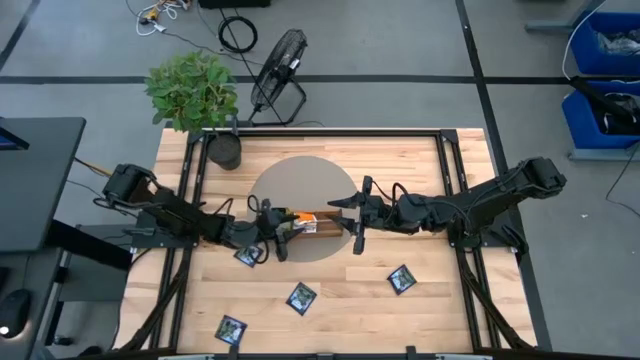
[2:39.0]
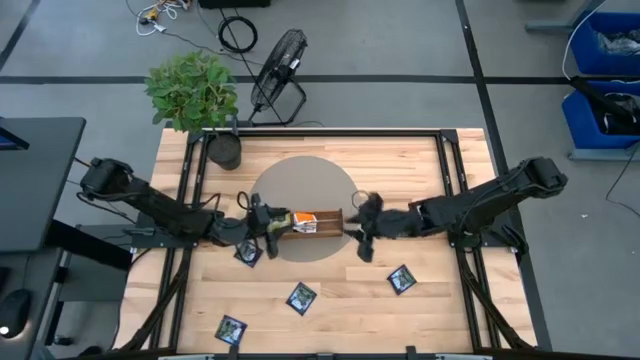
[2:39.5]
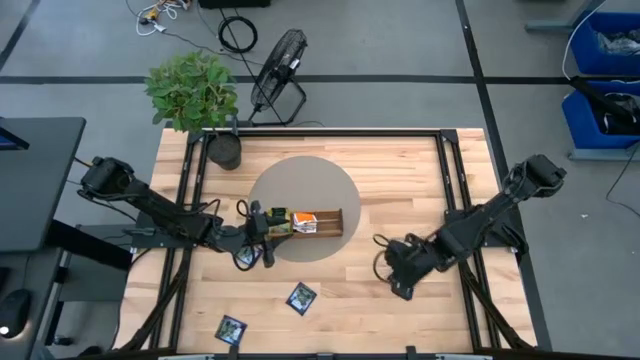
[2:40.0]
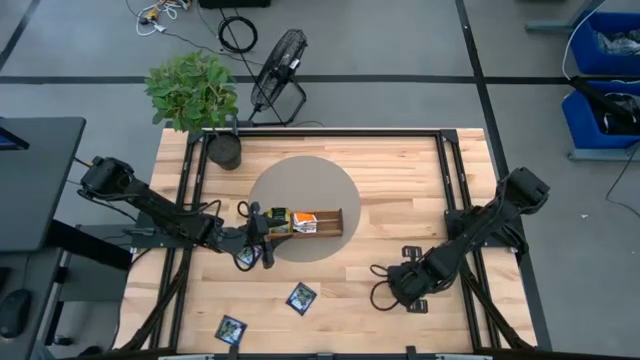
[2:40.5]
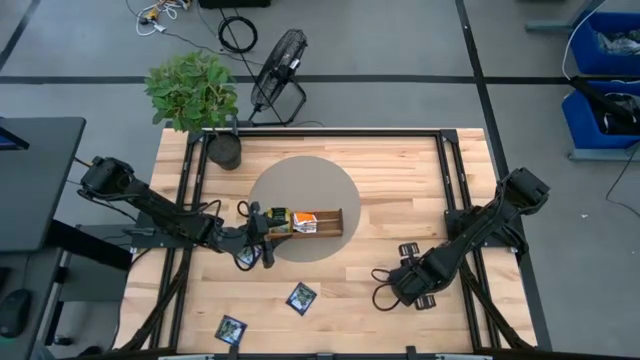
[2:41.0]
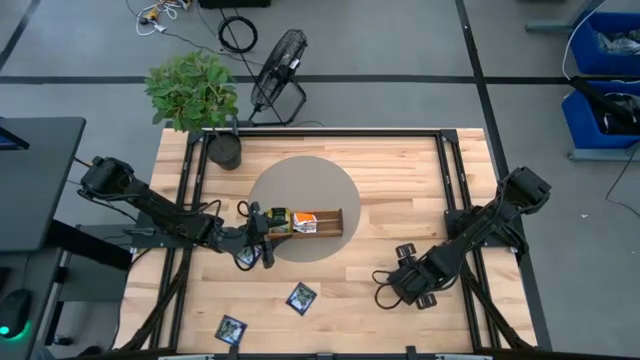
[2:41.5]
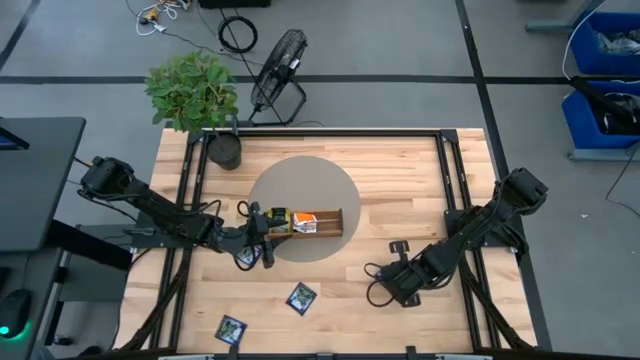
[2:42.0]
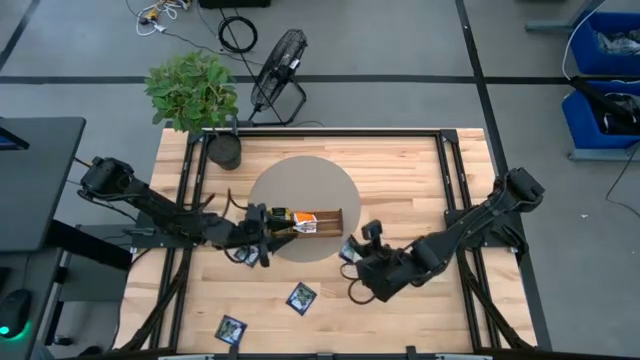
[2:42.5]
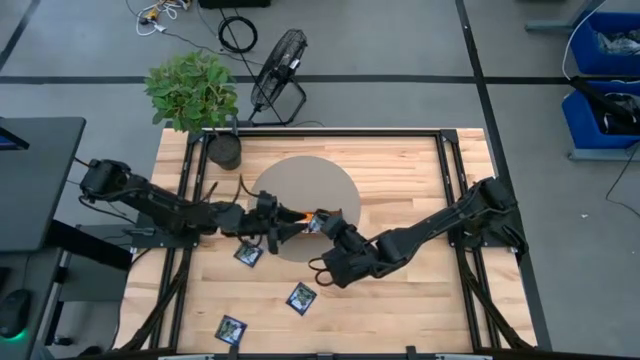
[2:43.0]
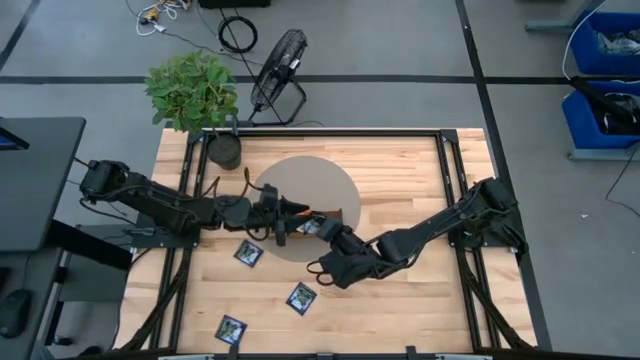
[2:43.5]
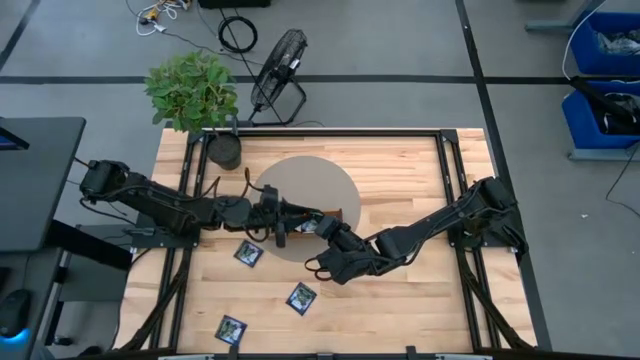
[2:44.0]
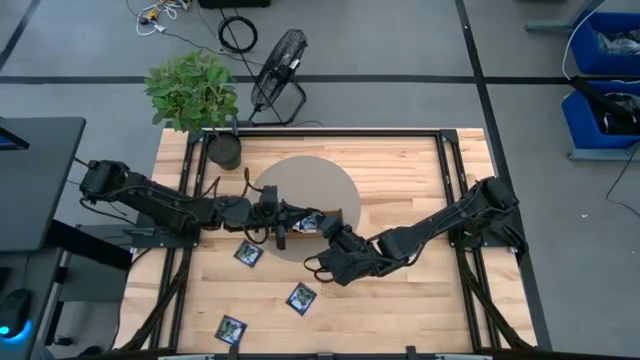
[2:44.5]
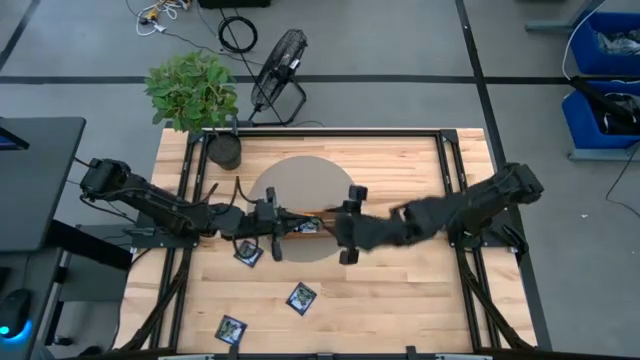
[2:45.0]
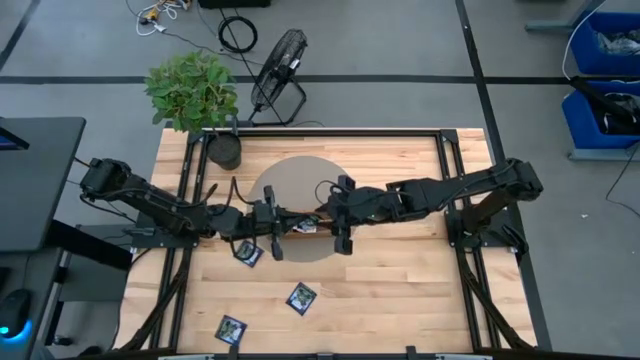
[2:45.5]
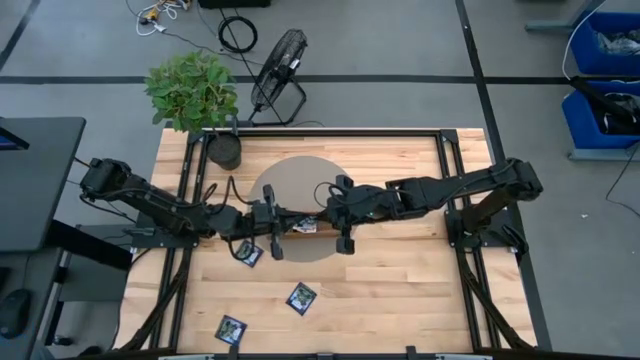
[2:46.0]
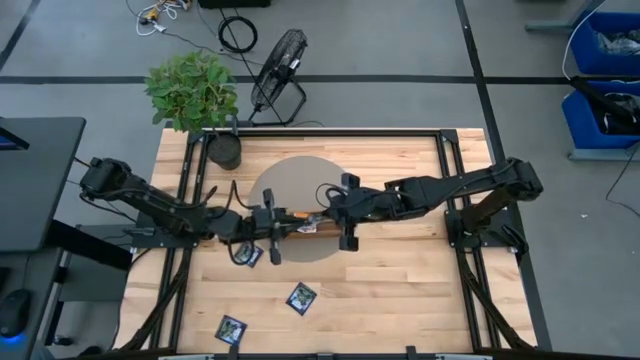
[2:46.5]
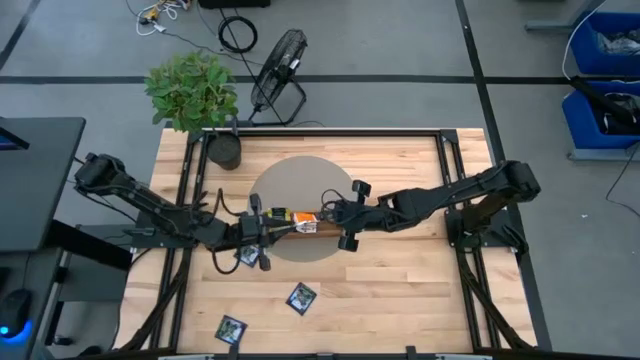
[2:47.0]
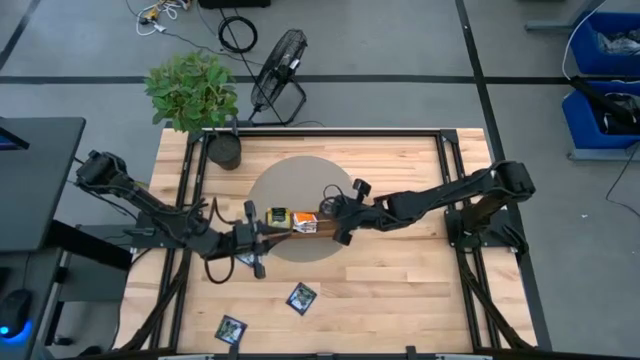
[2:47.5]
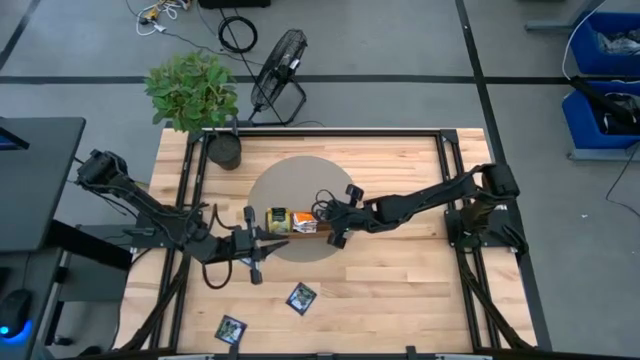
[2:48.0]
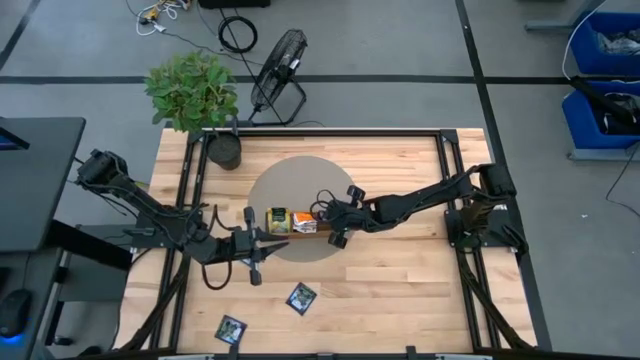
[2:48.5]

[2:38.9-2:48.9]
Task: Pick & Place Tea
Put the violet tea bag into the wooden organizer

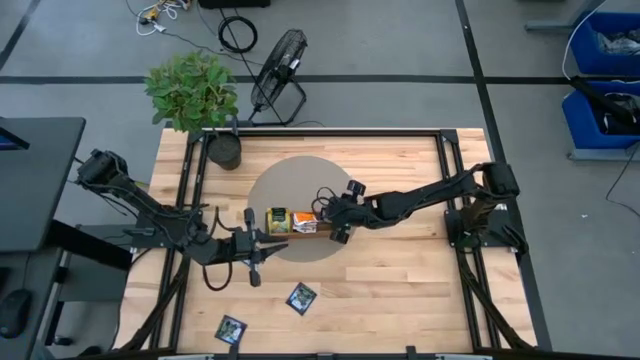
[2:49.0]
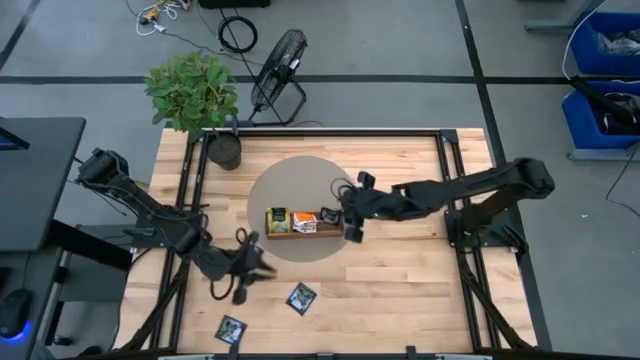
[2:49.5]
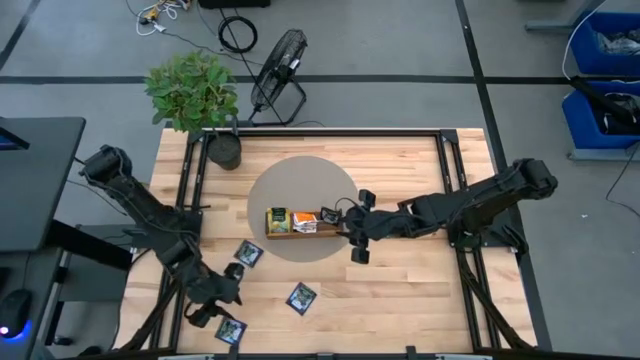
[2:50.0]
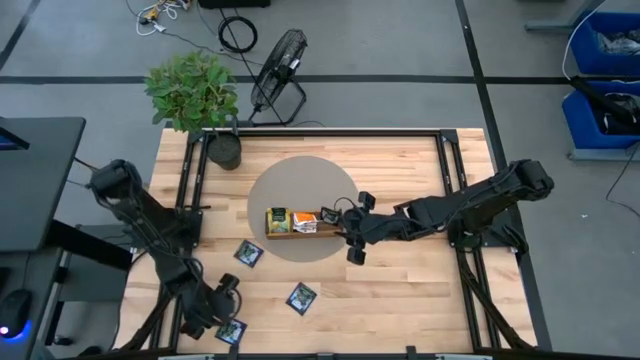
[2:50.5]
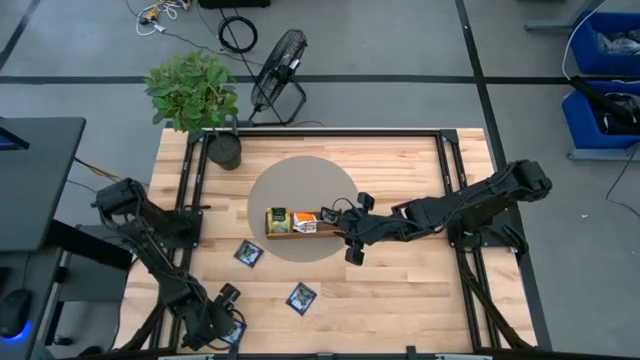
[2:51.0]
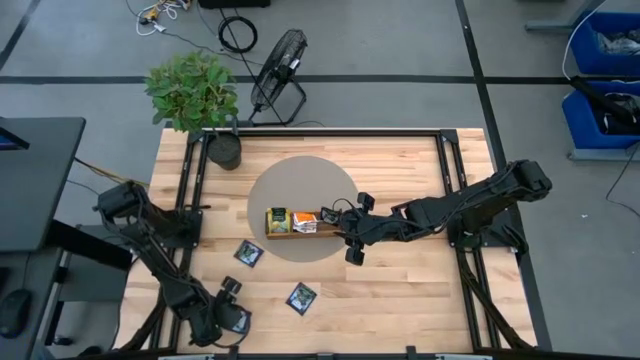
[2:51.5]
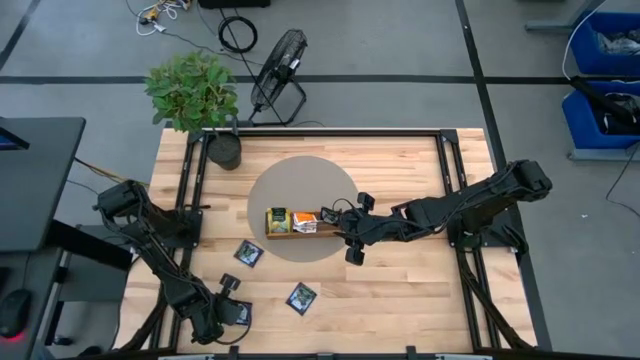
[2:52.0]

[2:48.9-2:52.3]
Move the bottom violet tea bag to the center left side of the table
